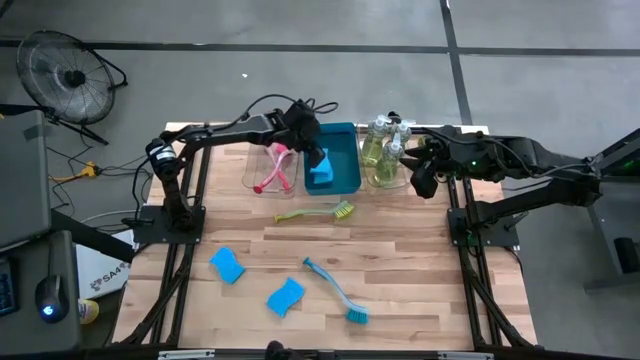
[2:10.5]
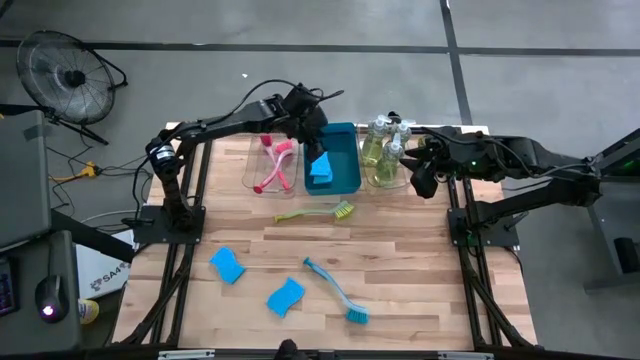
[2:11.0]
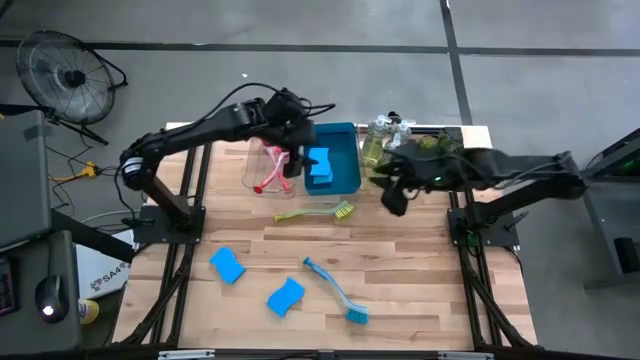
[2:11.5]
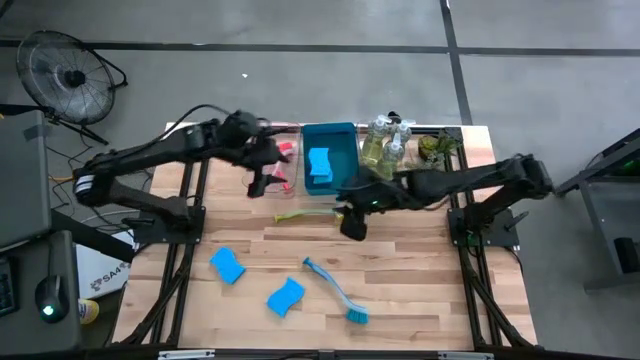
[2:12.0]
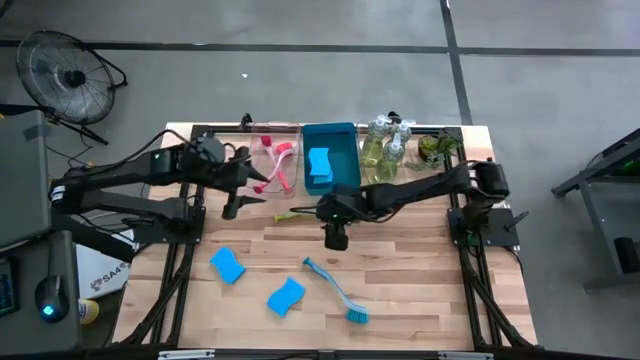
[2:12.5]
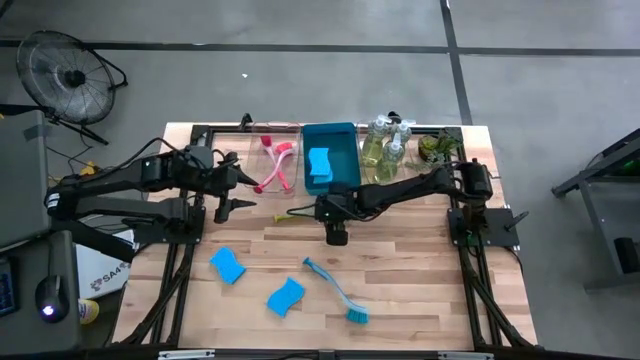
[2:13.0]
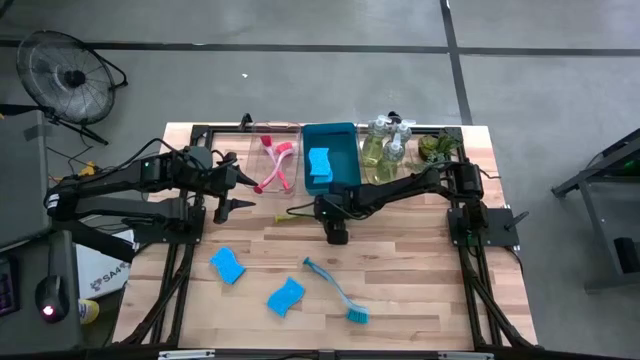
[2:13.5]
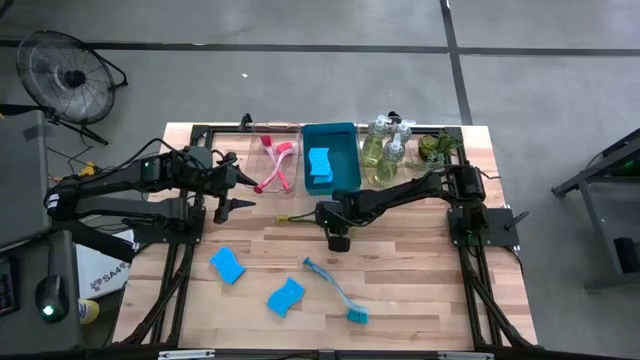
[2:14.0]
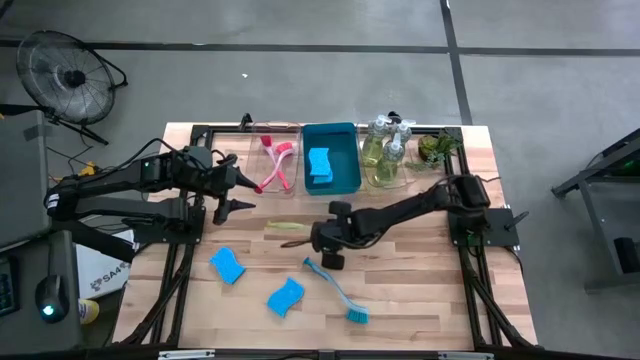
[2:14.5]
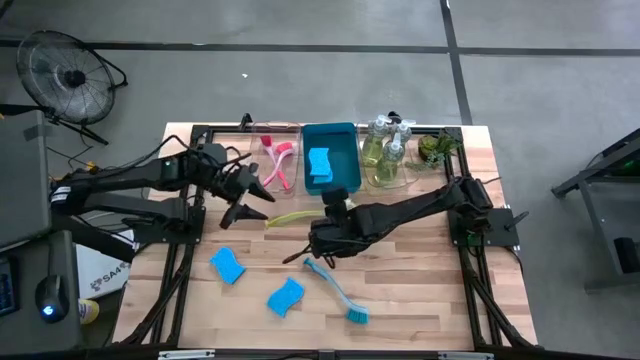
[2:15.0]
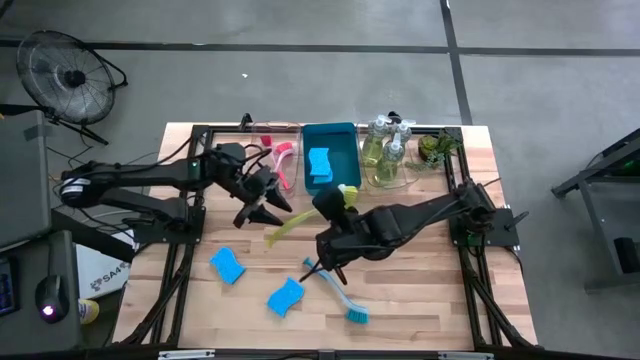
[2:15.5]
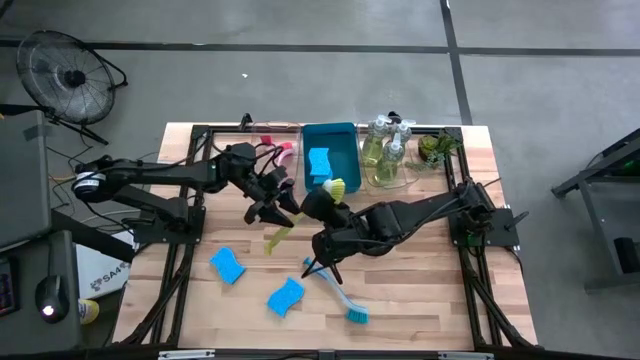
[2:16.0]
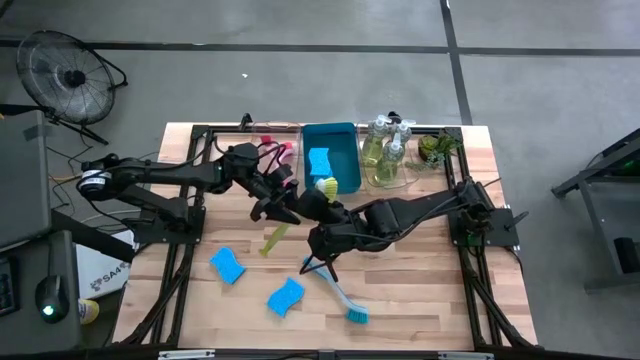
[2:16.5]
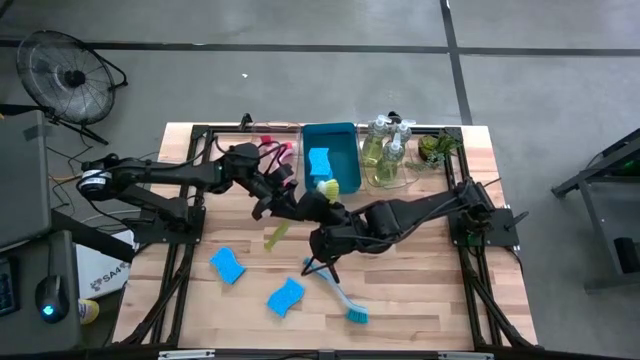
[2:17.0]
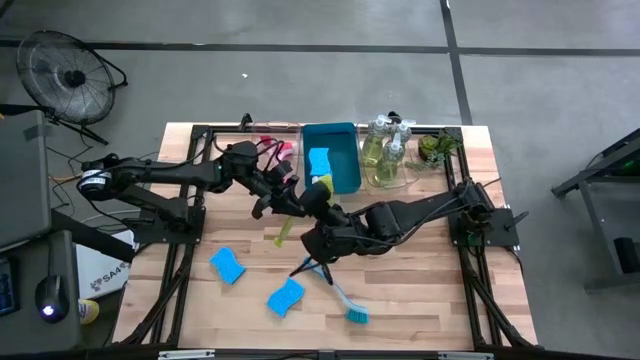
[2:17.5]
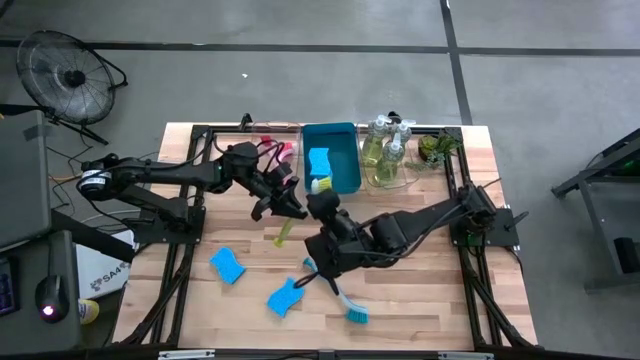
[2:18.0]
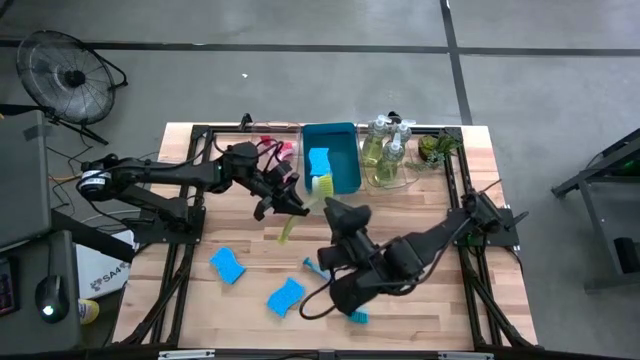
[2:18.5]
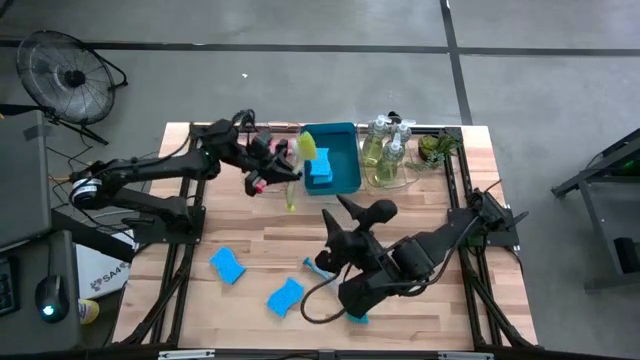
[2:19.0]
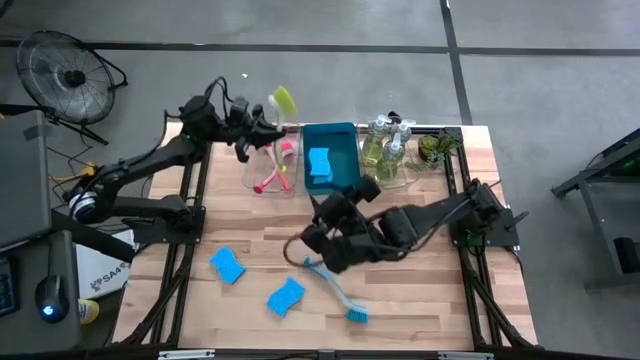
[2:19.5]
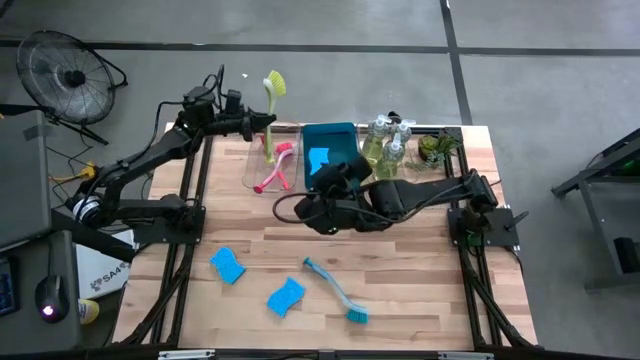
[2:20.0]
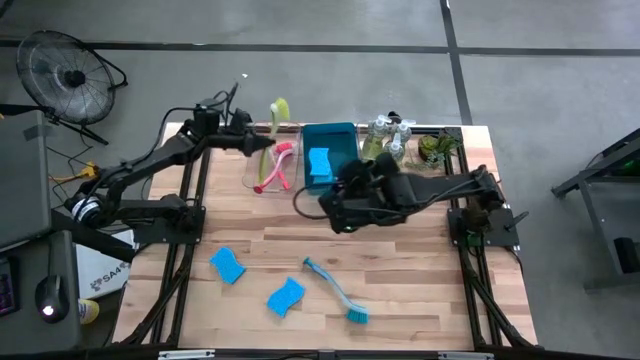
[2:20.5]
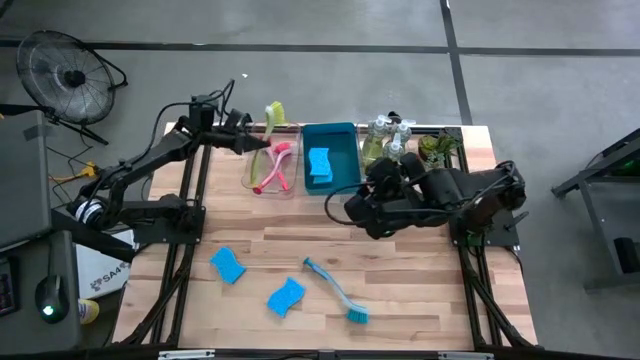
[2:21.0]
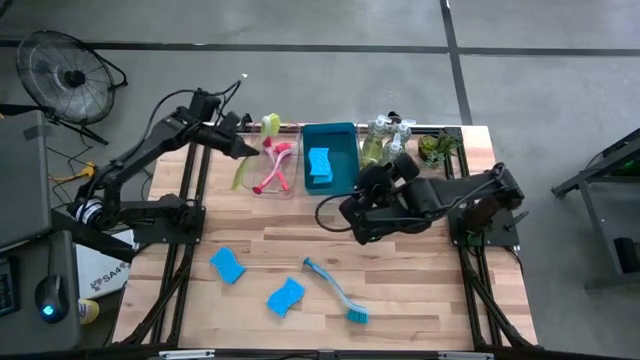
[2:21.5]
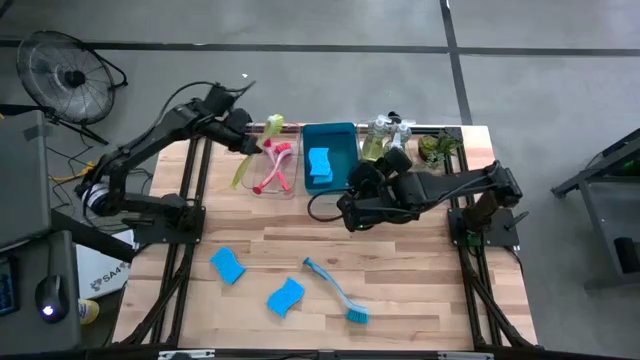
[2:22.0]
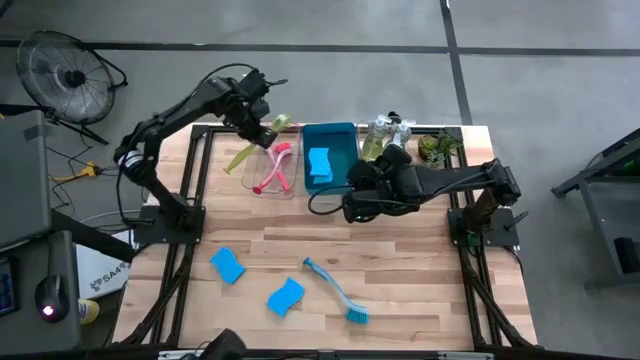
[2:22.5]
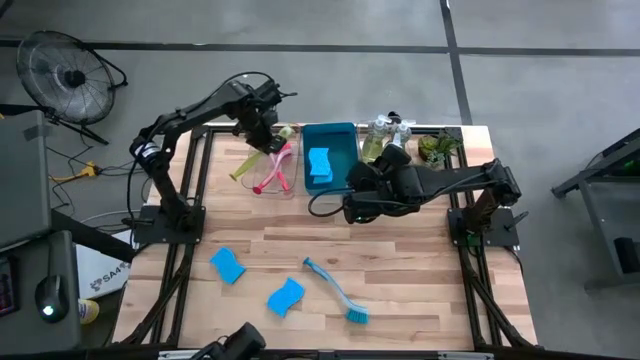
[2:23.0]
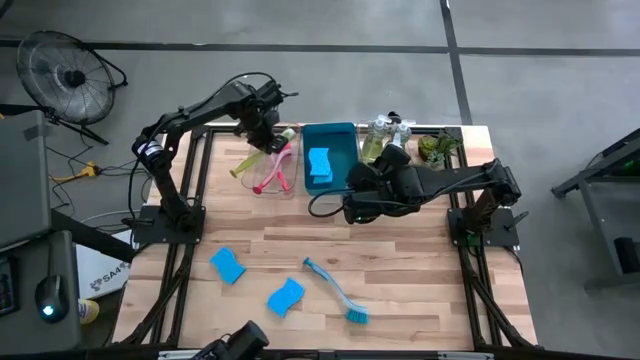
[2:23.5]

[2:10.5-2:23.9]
Task: Pick & Place Kitchen Sink Supplies
Put the yellow dish brush into the left transparent bin

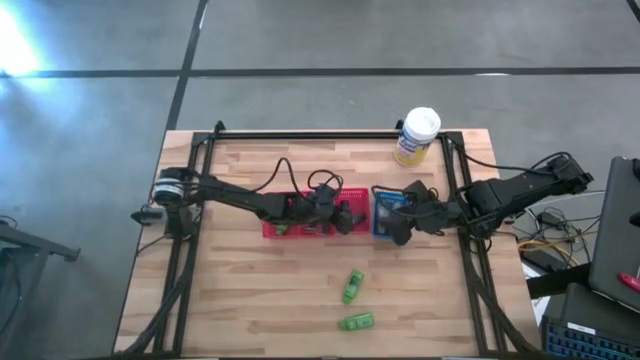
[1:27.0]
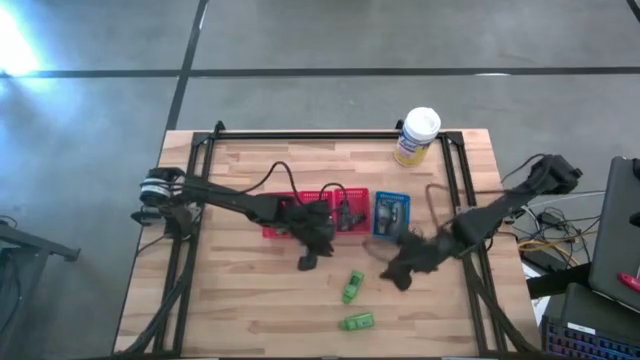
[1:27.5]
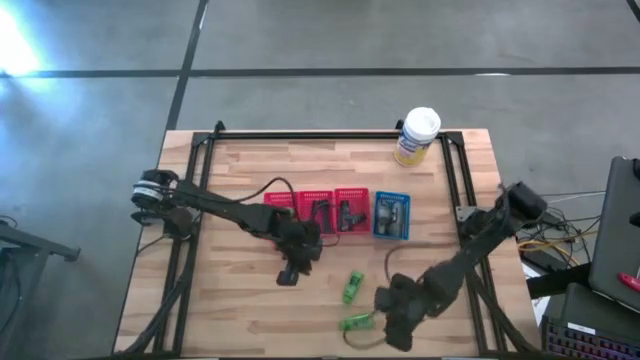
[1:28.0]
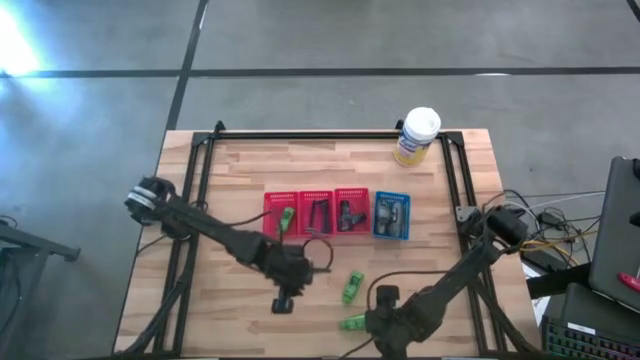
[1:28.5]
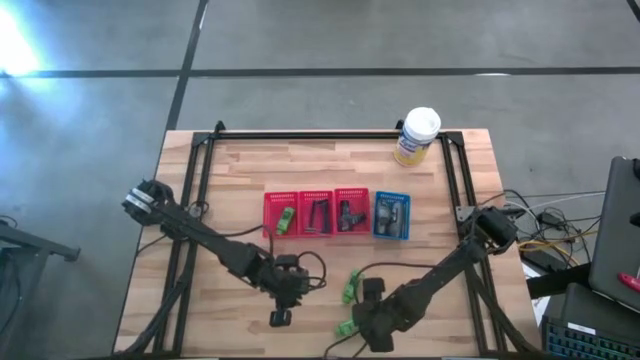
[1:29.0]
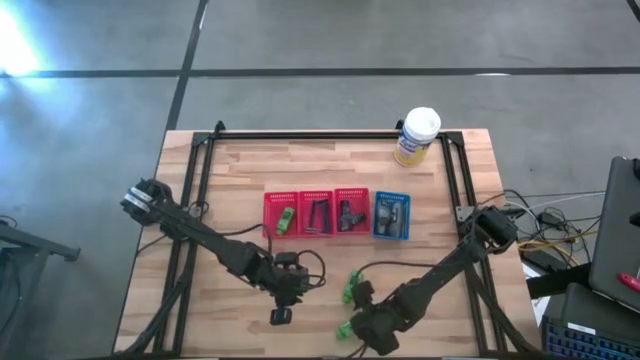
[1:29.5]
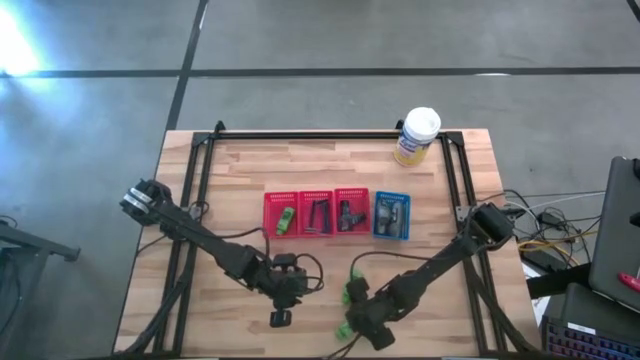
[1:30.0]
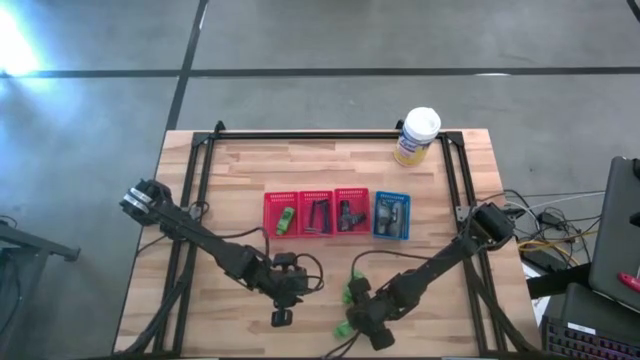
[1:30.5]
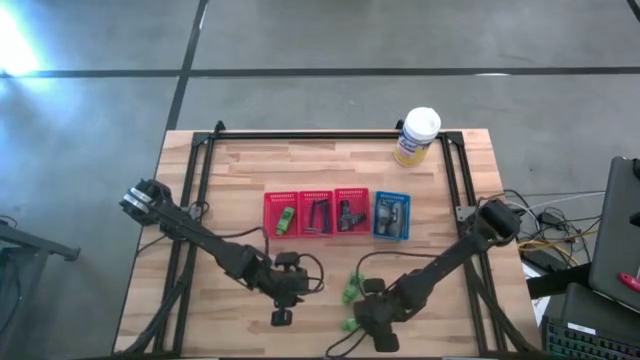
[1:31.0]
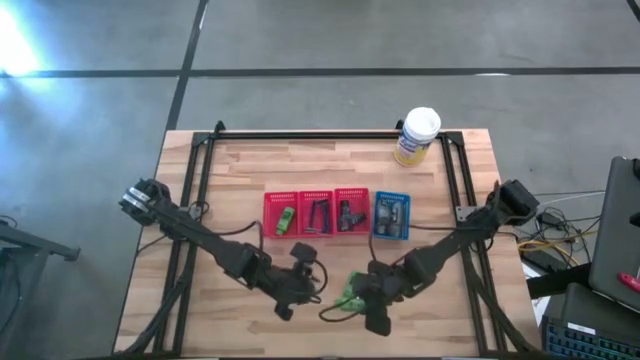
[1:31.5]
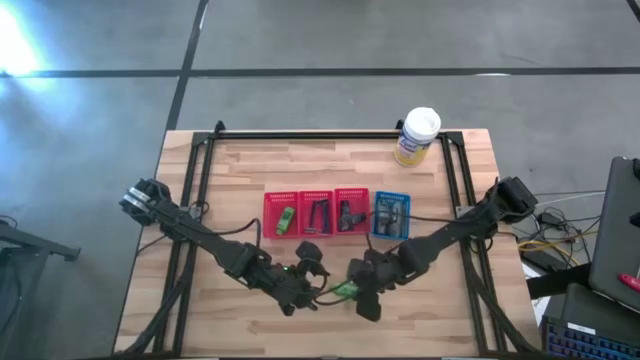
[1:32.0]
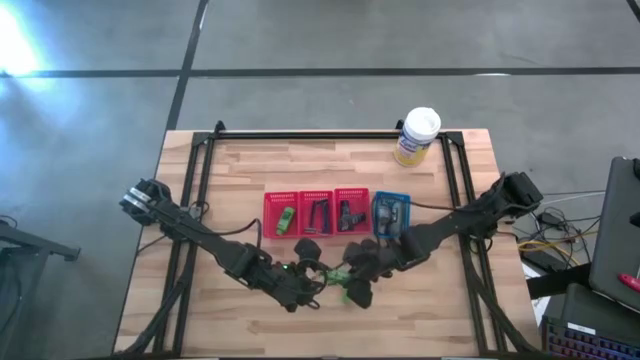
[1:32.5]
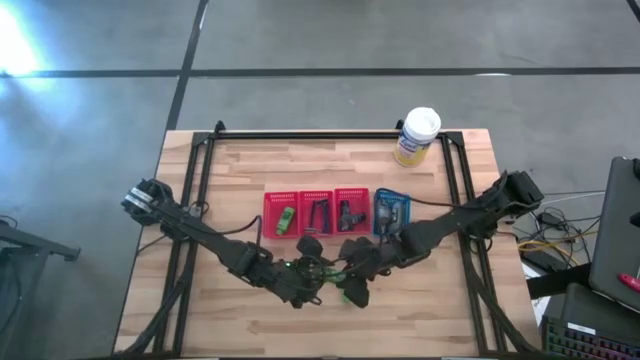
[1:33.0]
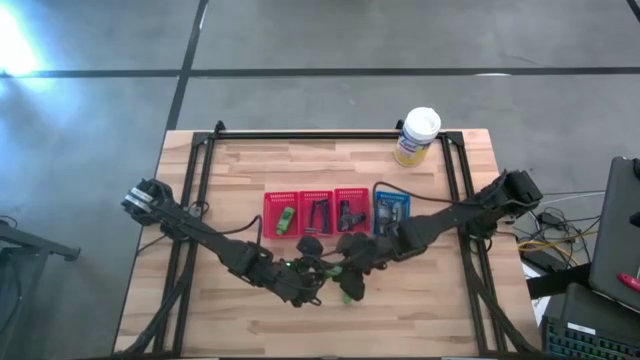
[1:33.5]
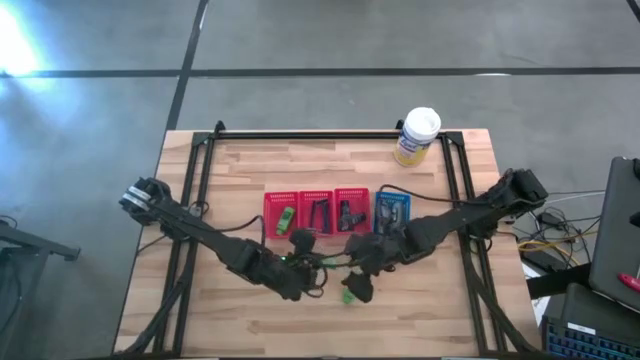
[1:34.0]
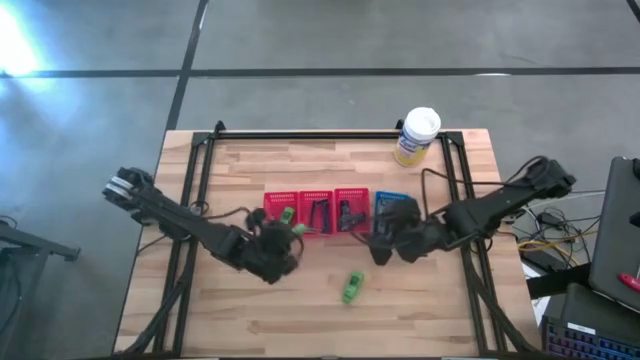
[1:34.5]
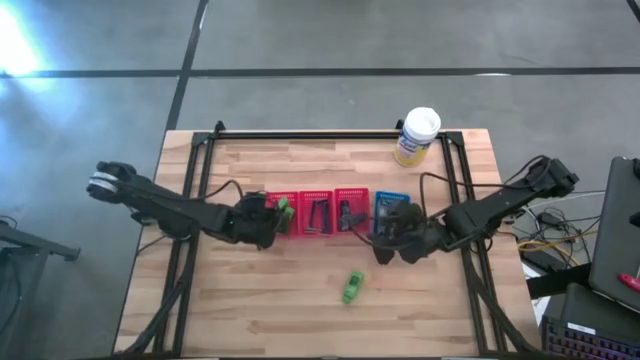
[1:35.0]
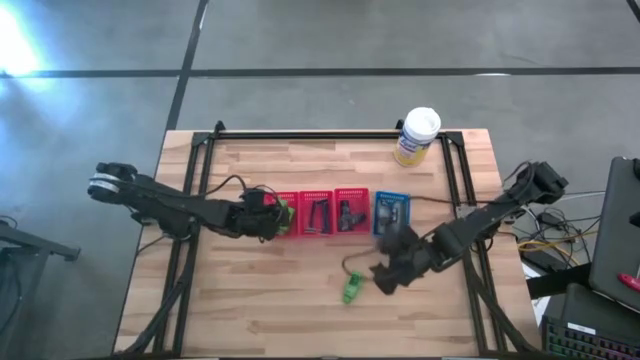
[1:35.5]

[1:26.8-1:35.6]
Task: Pick & Place Travel size toiletries
Put the green shampoo into the left red bin
